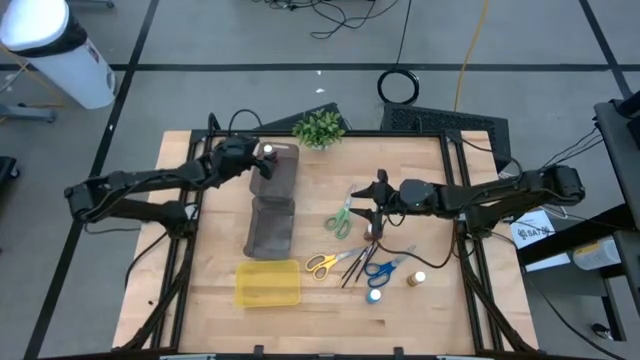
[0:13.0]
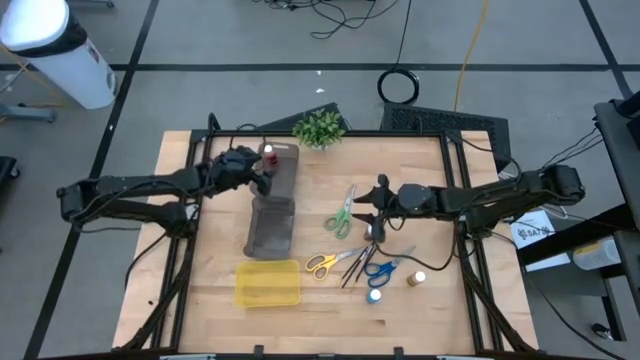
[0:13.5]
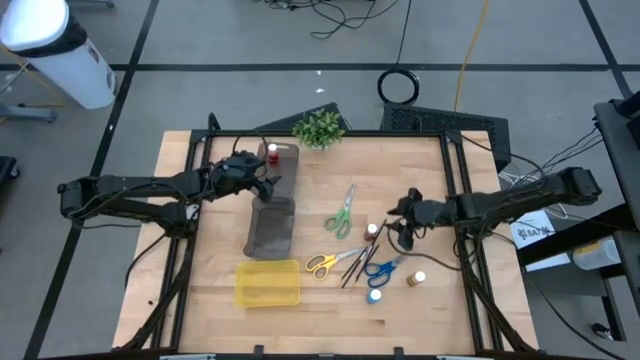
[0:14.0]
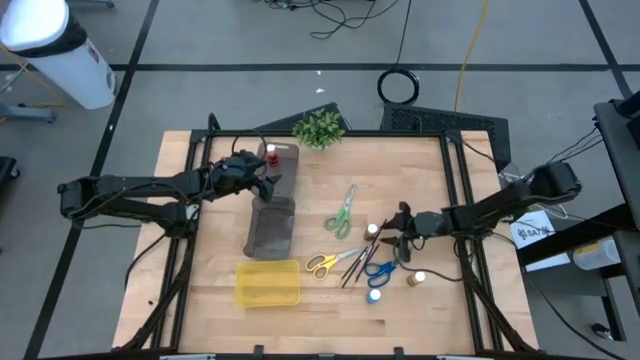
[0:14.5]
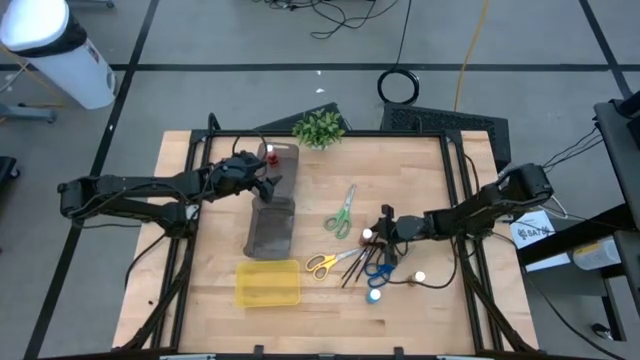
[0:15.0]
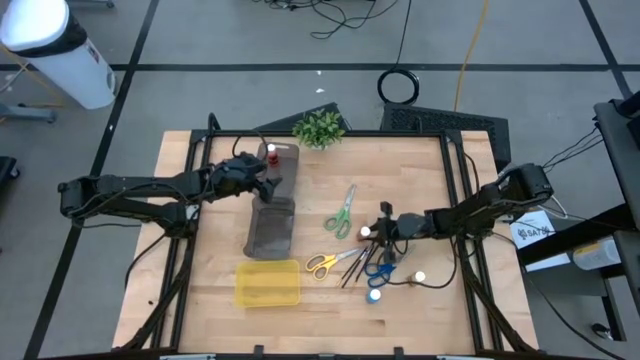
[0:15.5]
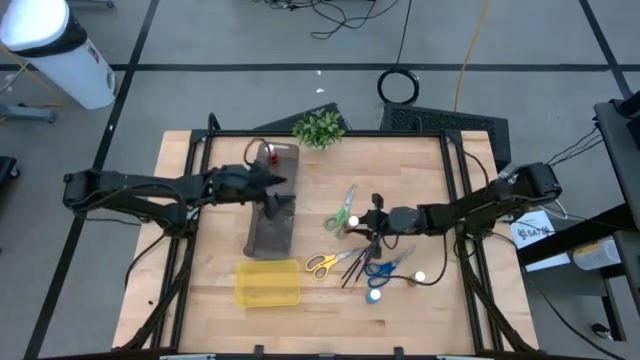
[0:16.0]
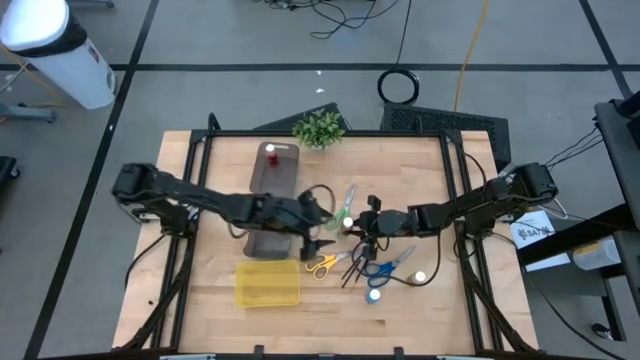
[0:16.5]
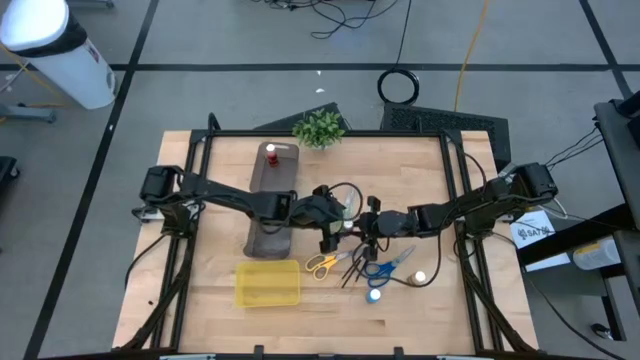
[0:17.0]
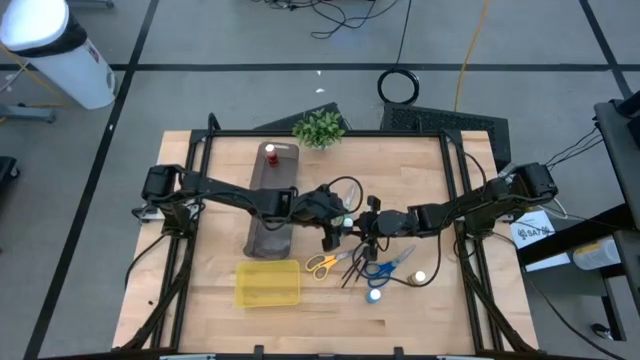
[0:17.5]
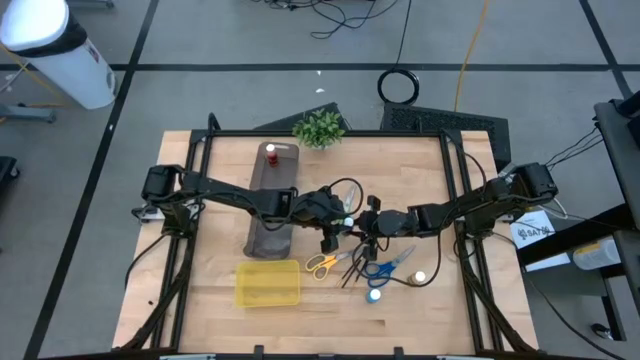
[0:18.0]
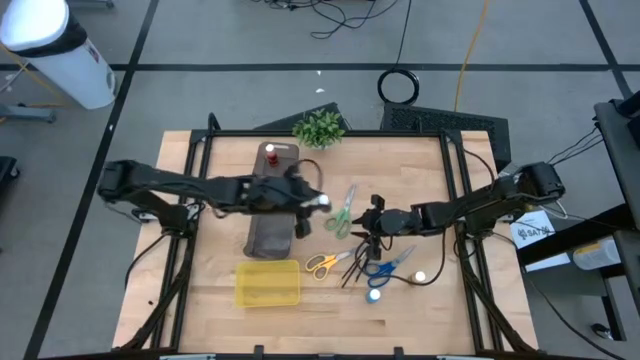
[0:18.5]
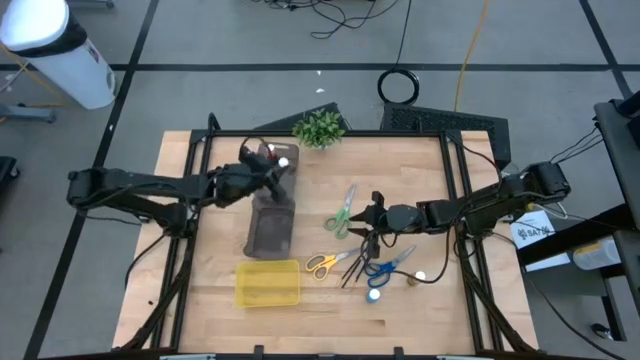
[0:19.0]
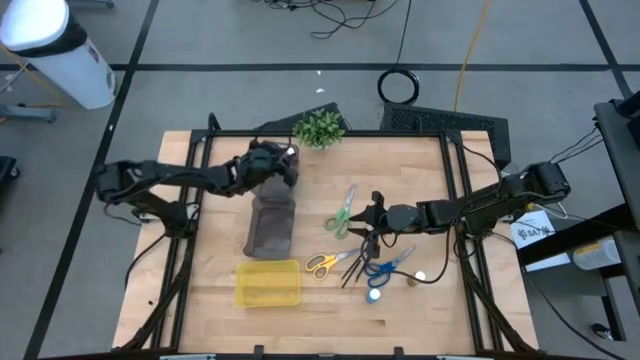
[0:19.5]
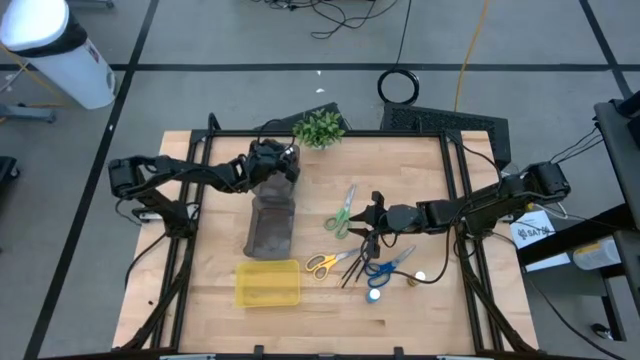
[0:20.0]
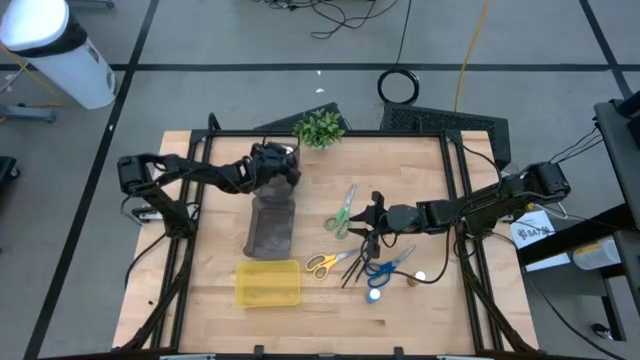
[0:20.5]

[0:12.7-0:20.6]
Task: Pick & Place Paint Supplies
Put the brown paint bottle into the top black bin

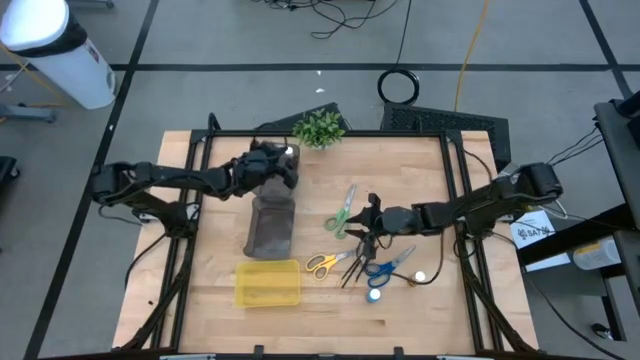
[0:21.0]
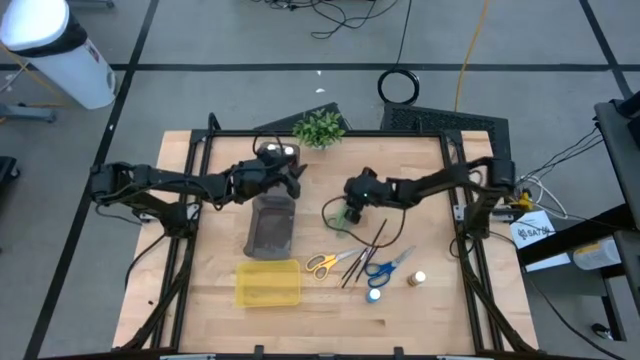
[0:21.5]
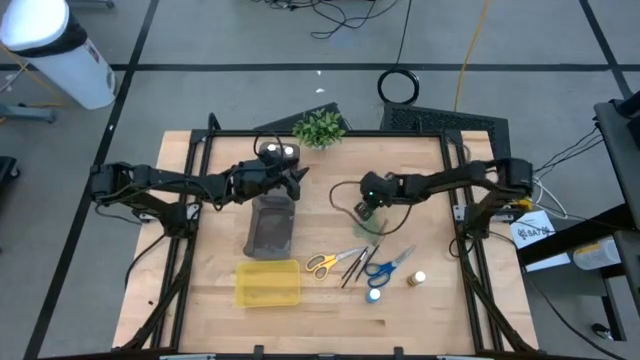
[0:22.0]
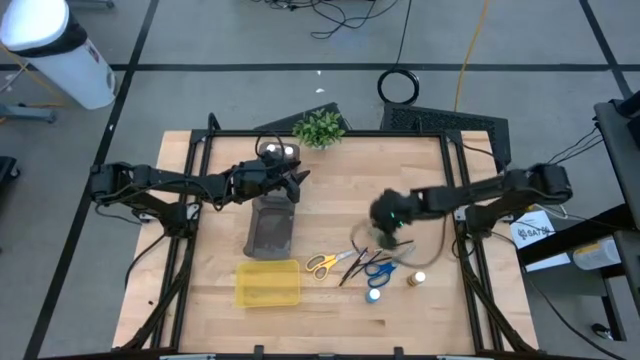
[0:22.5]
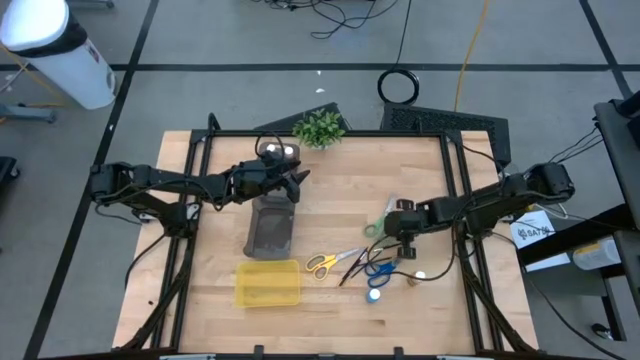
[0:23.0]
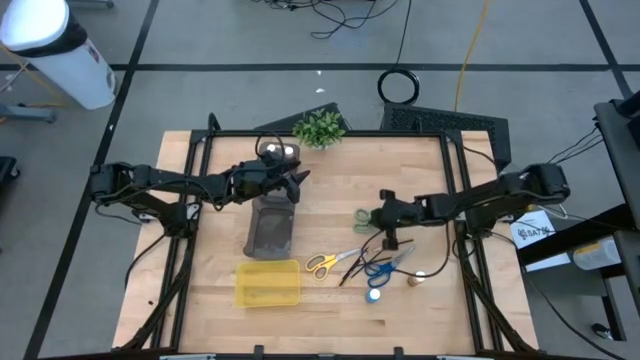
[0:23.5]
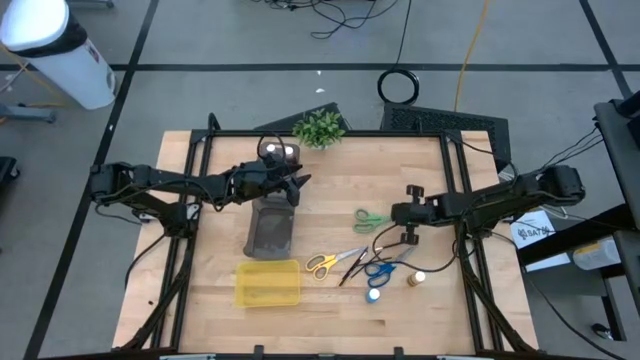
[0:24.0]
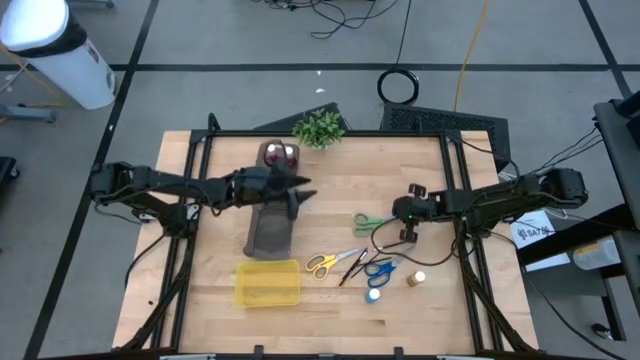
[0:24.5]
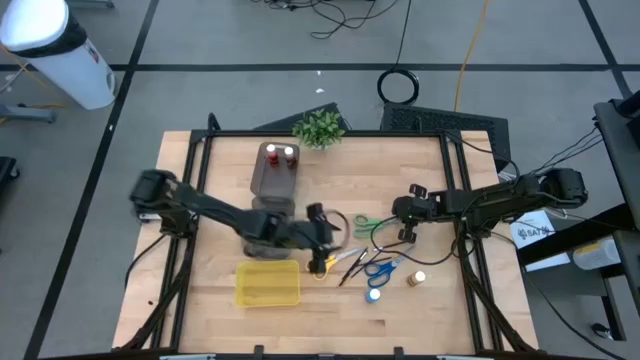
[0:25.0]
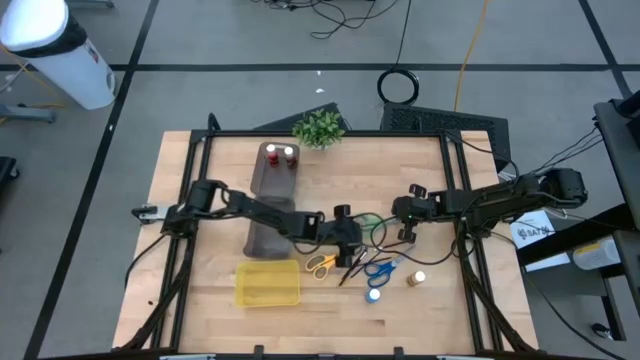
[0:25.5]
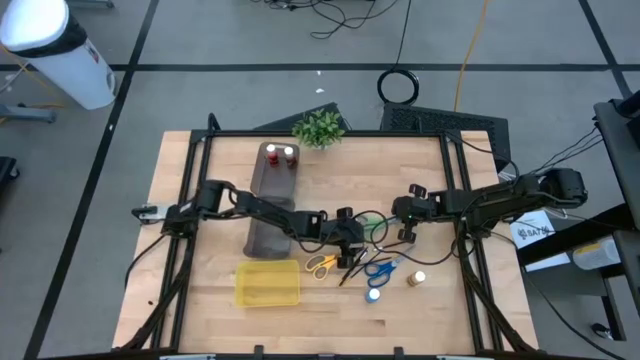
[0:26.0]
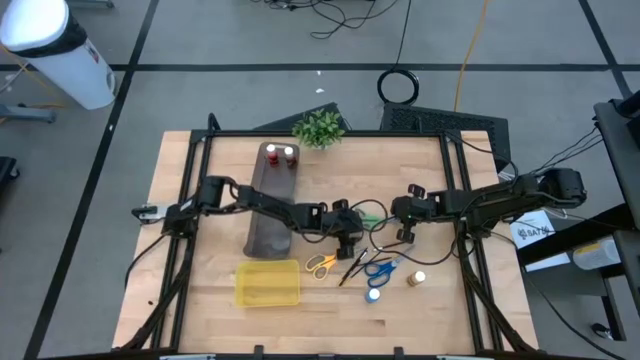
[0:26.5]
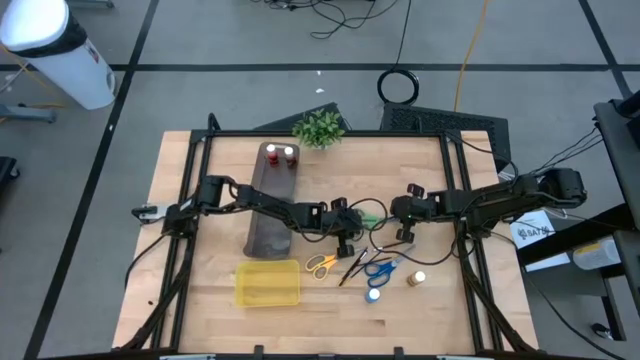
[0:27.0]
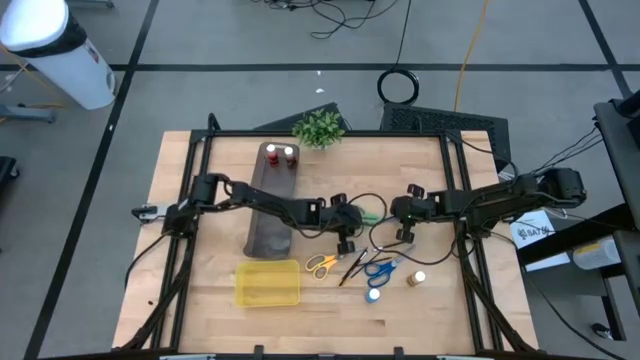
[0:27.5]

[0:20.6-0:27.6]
Put the green scissors into the bottom black bin

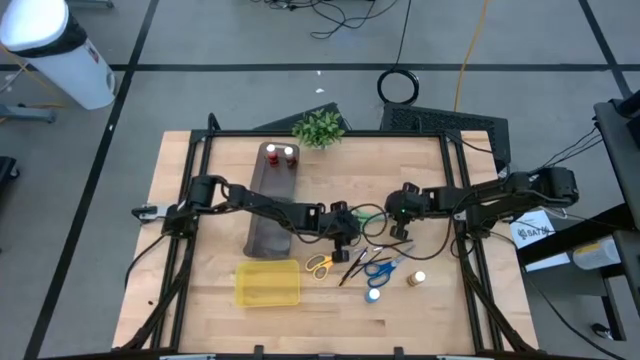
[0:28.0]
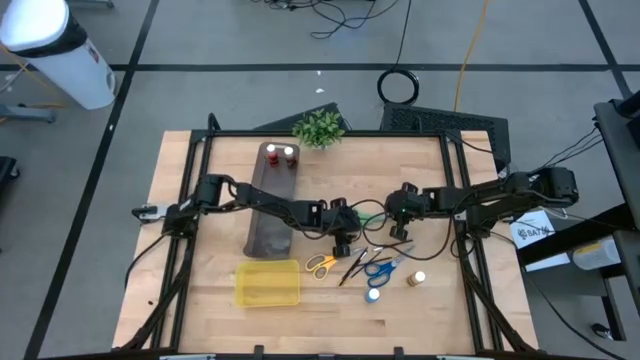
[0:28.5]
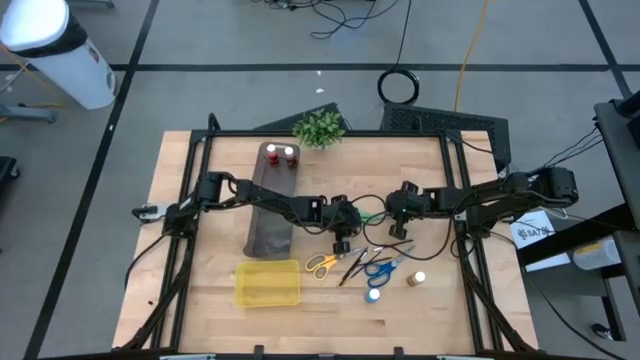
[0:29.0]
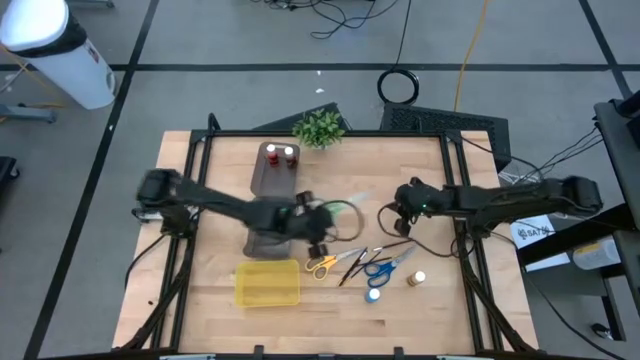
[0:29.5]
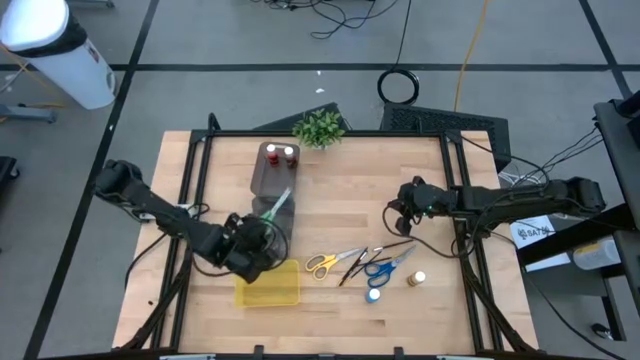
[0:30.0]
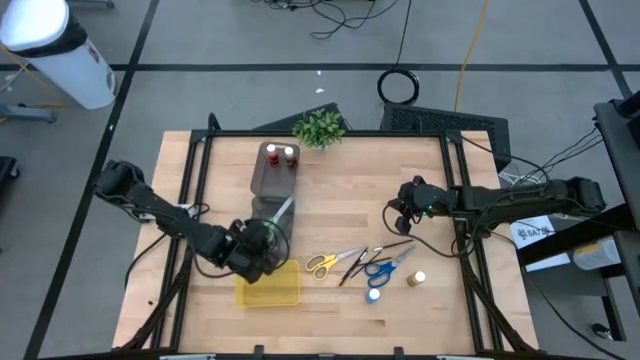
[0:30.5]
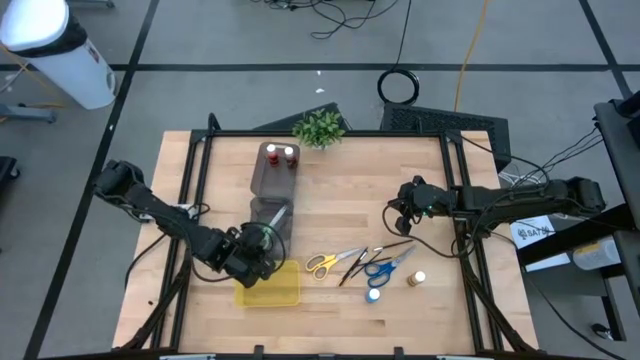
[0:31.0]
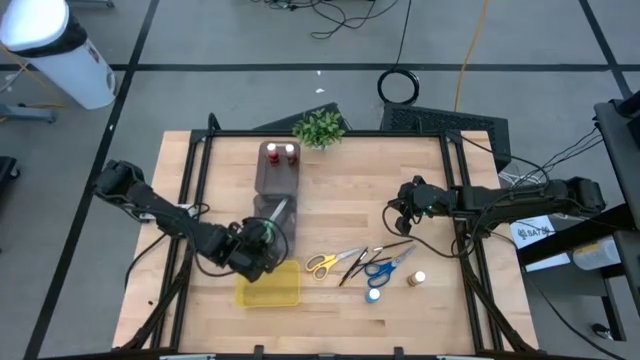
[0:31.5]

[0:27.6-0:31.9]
Put the green scissors into the bottom black bin

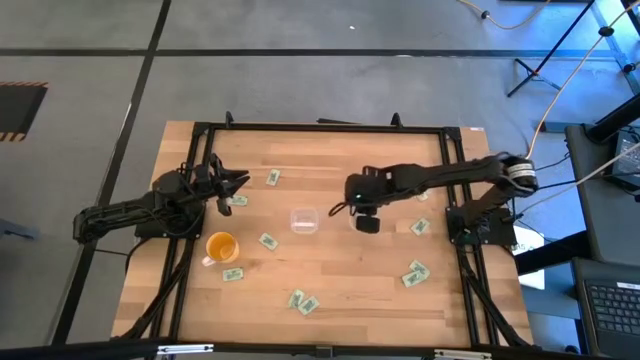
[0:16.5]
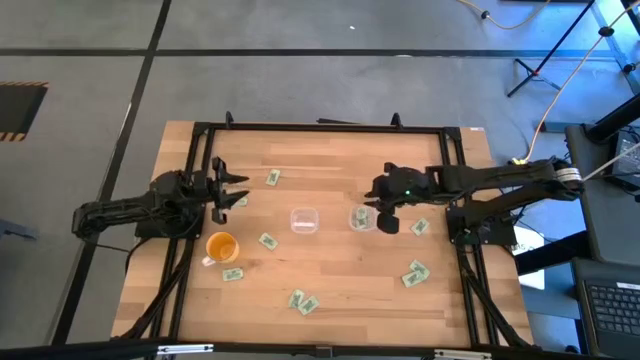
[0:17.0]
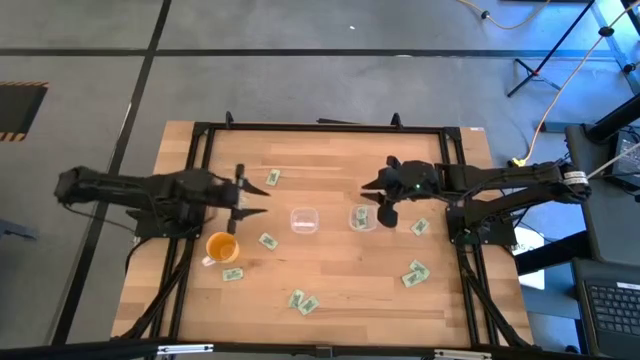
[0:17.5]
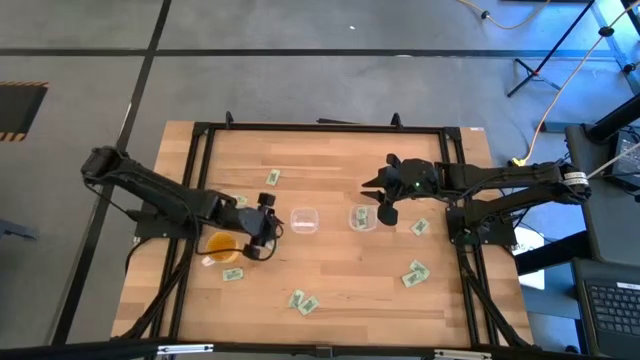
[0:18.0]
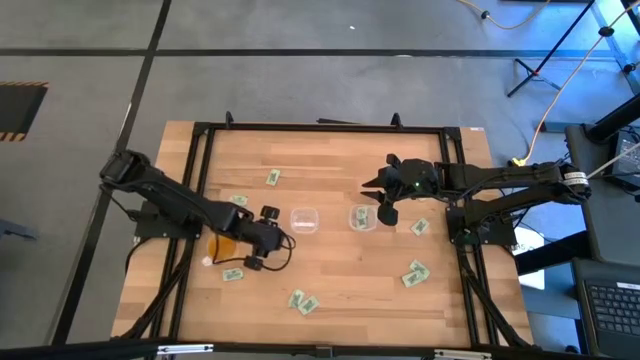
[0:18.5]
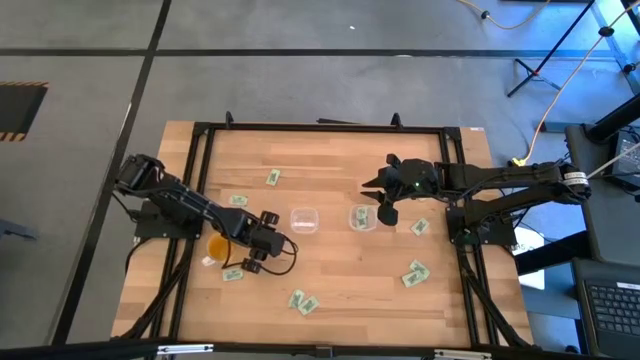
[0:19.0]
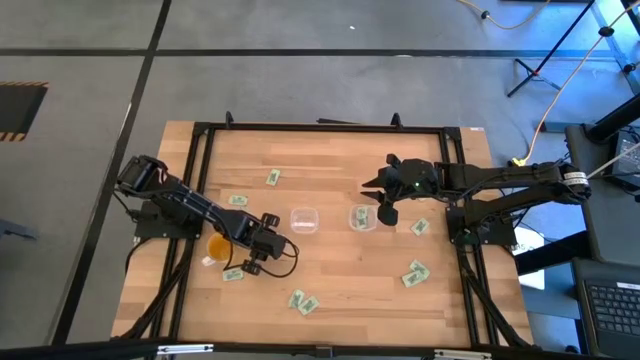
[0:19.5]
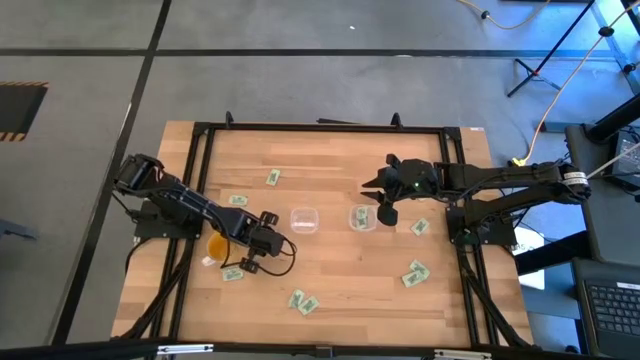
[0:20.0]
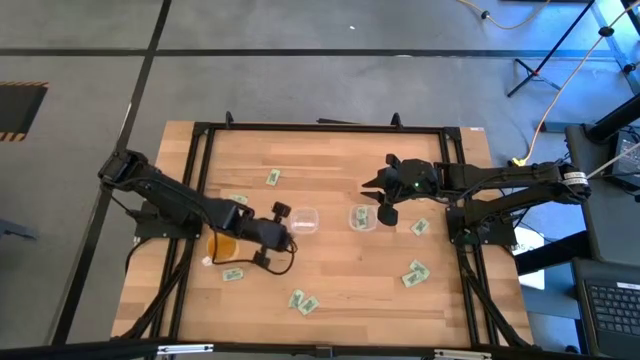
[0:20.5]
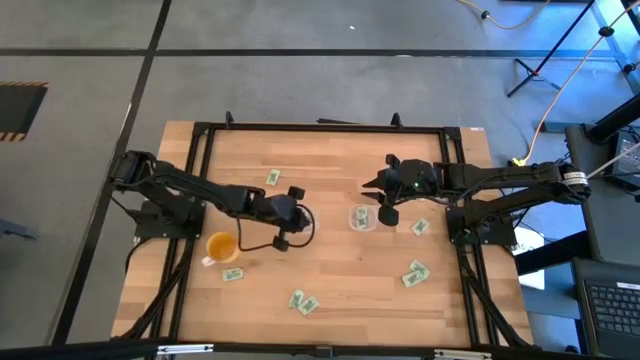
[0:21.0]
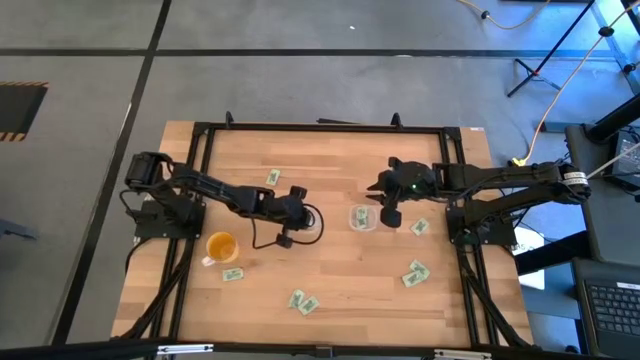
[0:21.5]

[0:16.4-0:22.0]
Task: Pick and place Stevia / Truvia into bins
Put the stevia packet into the left transparent container
